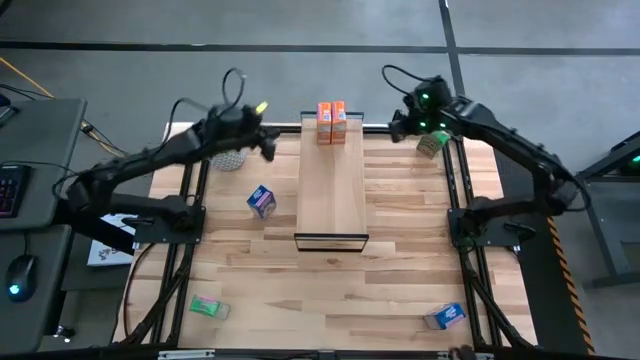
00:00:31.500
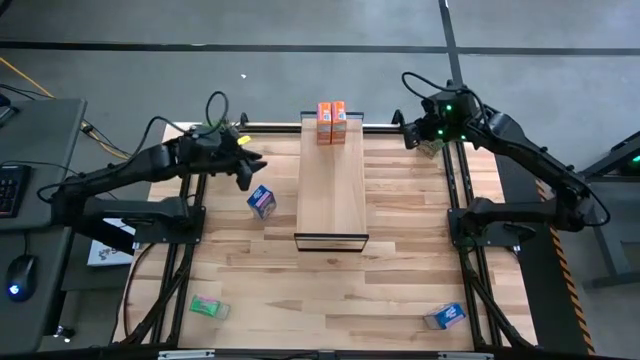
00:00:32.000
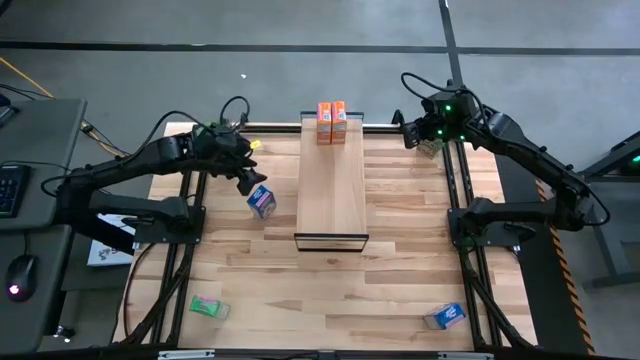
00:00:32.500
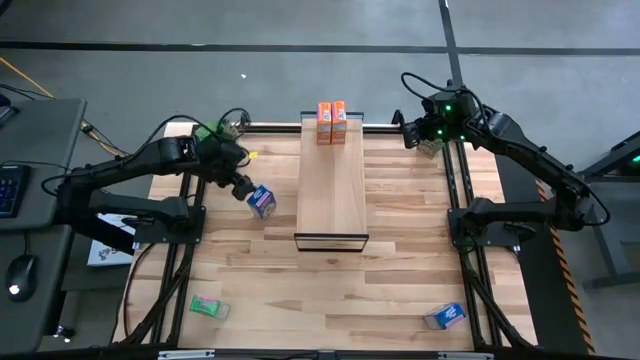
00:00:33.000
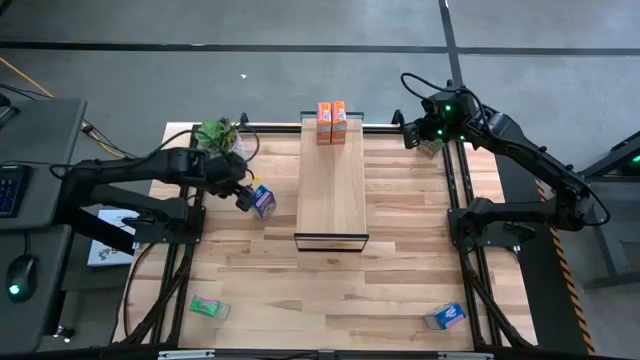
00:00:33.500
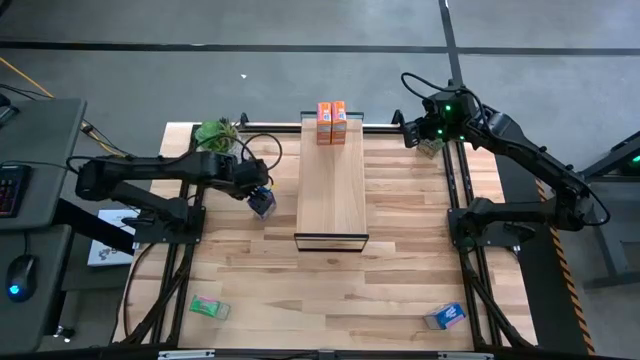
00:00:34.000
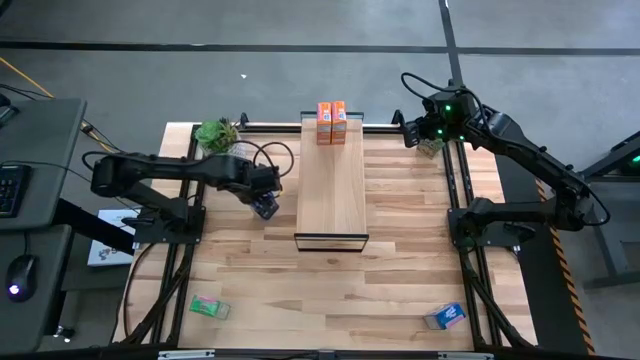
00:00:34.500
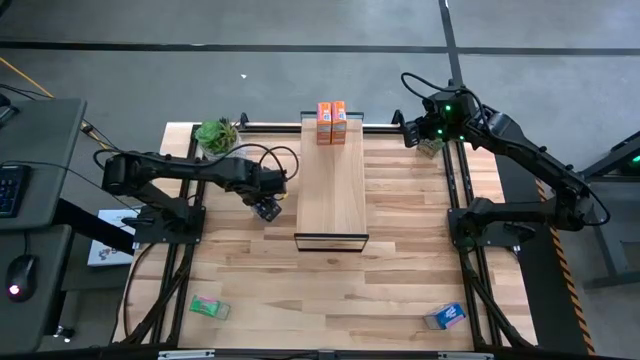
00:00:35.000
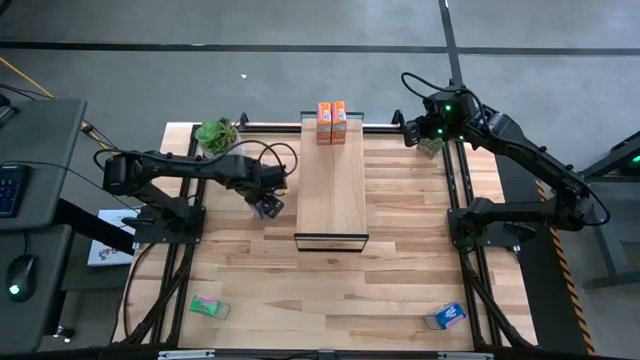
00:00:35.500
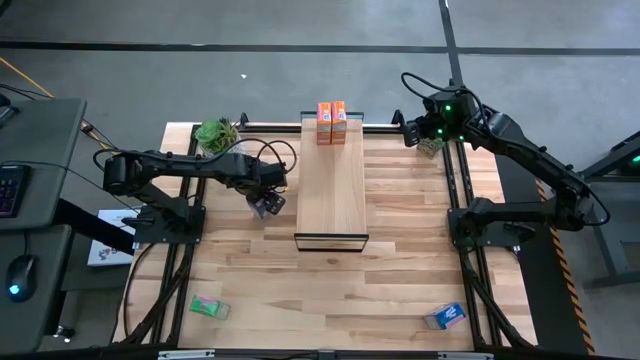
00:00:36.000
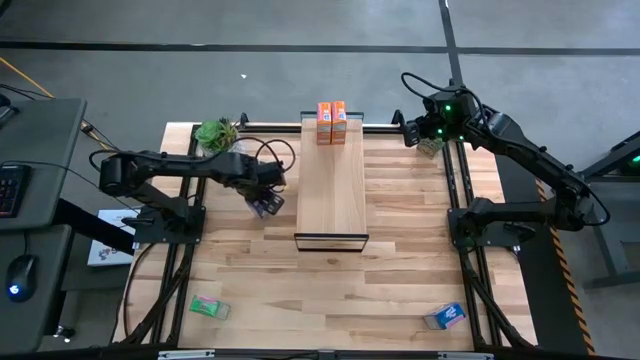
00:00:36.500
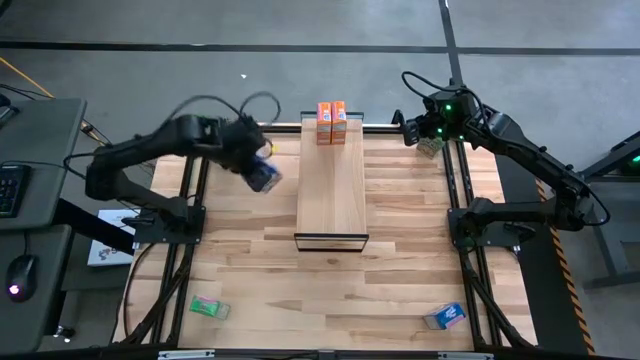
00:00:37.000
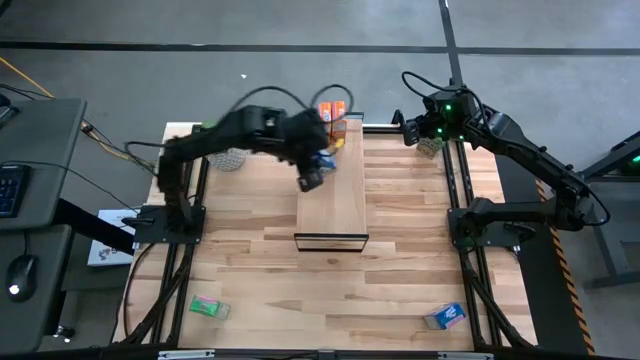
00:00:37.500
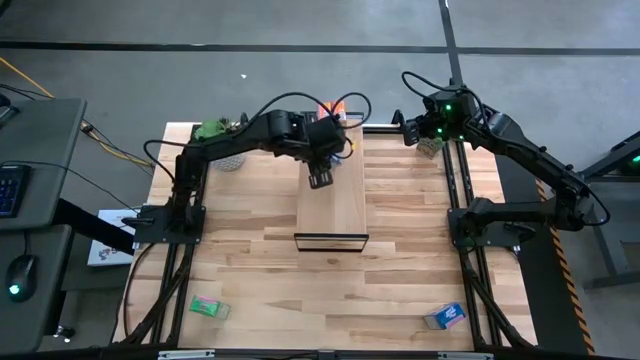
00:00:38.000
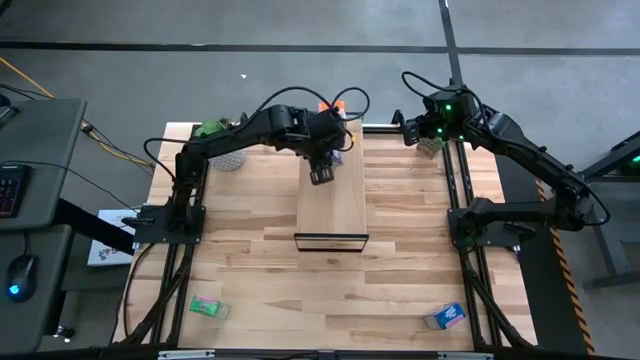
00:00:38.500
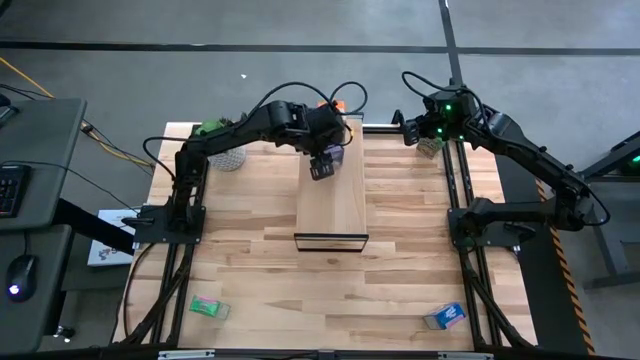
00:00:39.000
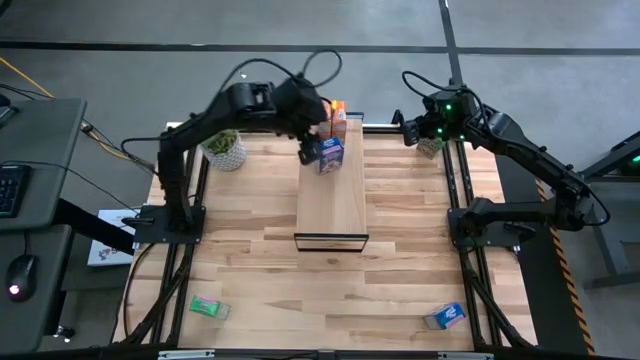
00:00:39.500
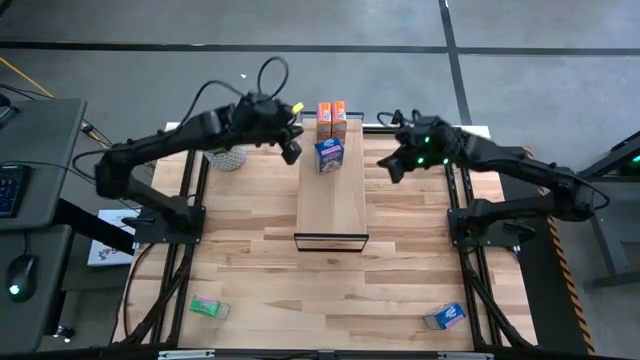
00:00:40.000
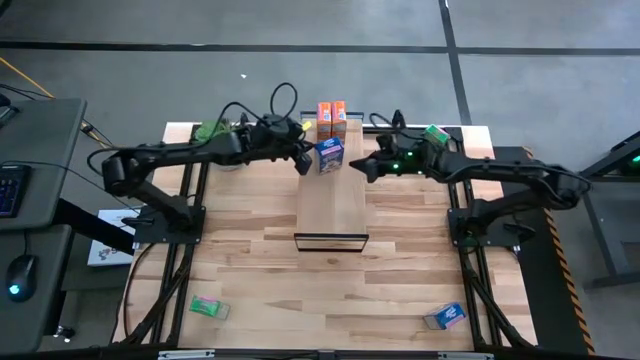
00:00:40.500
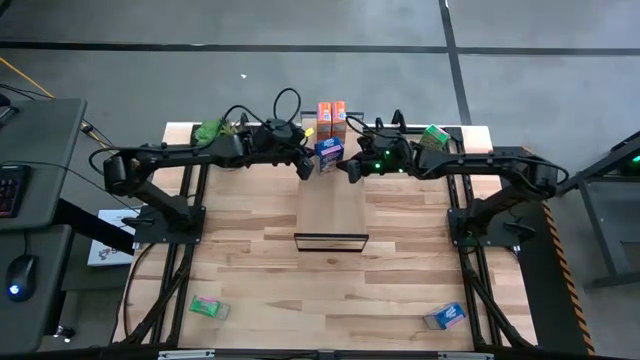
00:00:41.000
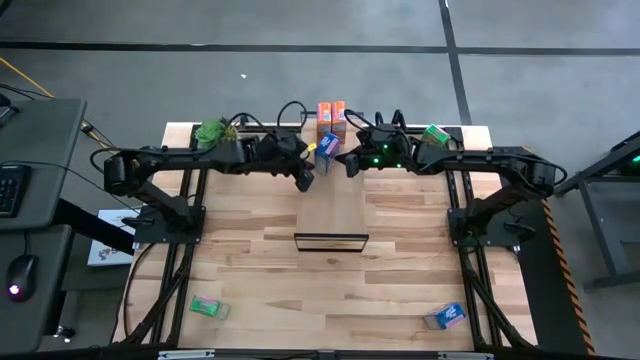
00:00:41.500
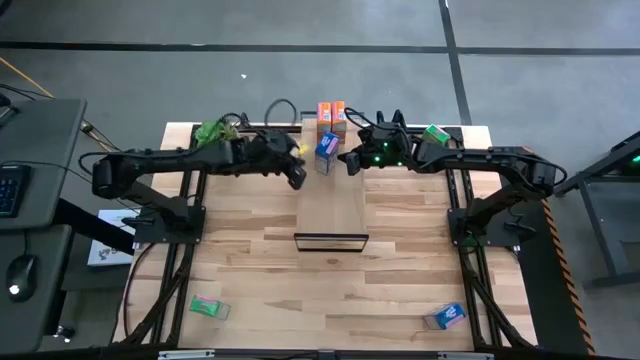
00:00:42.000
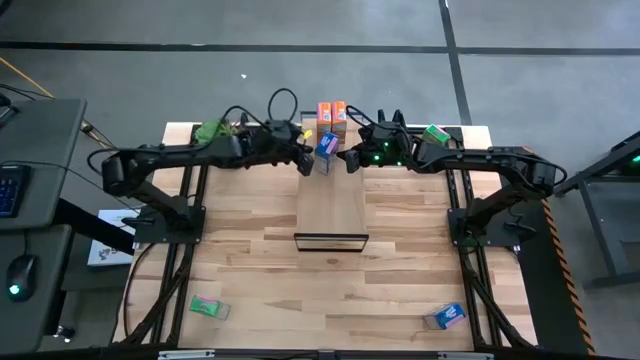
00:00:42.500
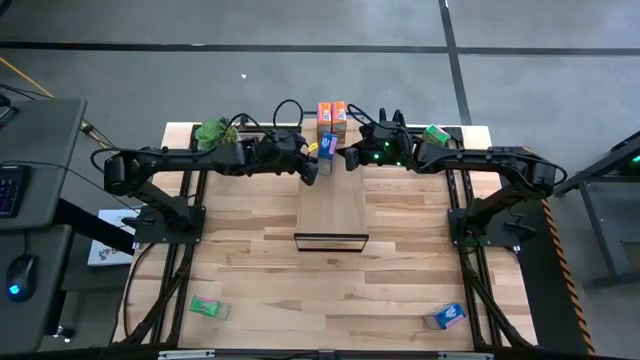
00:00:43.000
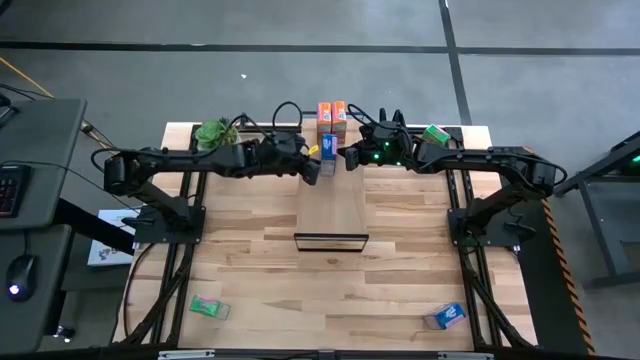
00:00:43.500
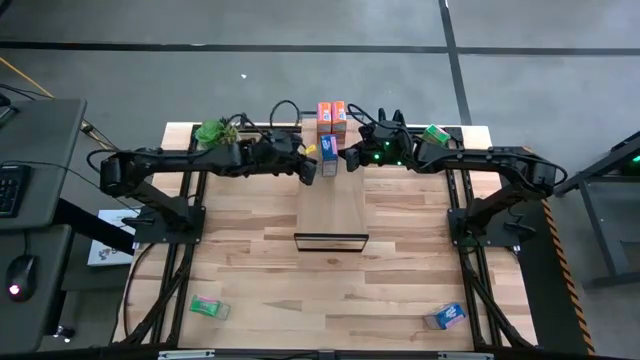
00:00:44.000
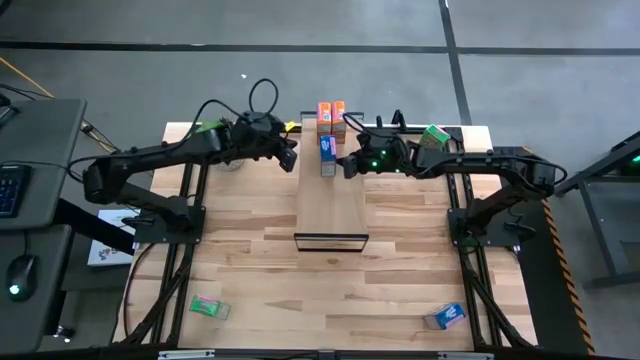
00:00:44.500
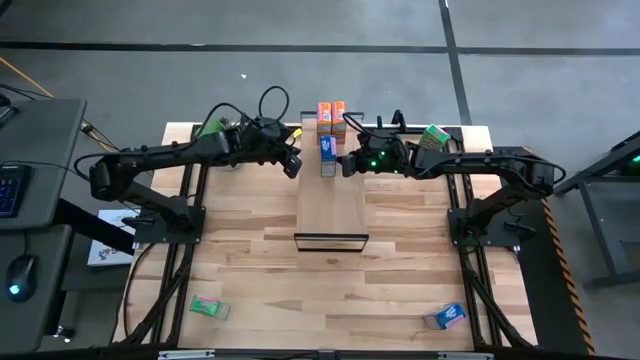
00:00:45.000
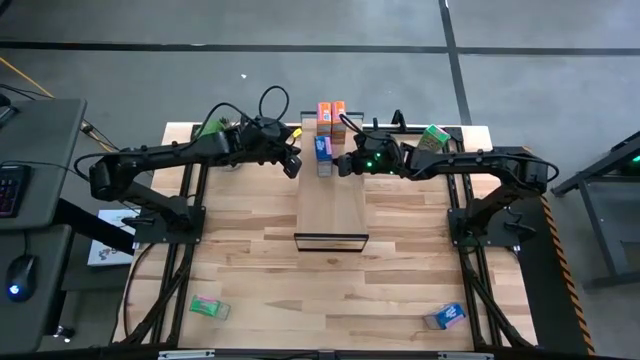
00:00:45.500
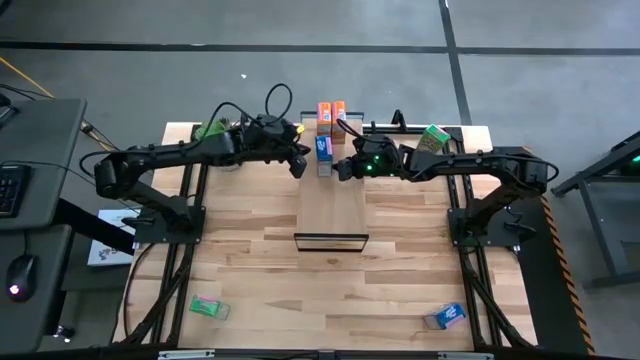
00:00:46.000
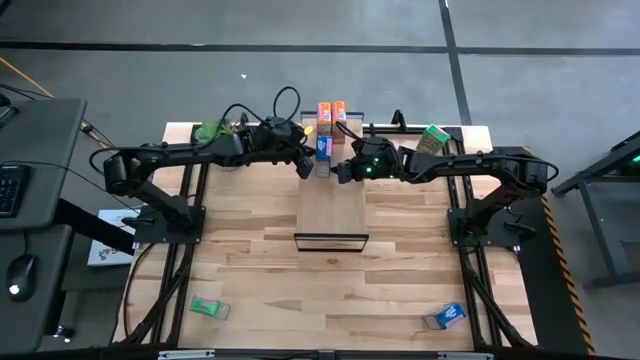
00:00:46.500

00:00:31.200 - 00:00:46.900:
Task: Stack cereal on shelf
Put the top blue cereal box on the shelf
